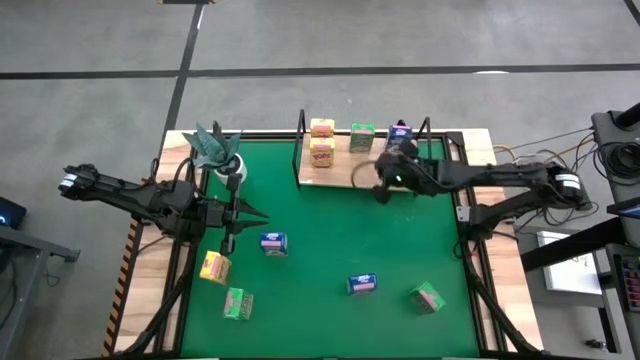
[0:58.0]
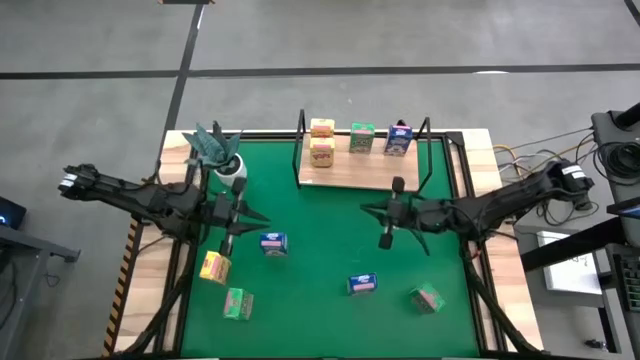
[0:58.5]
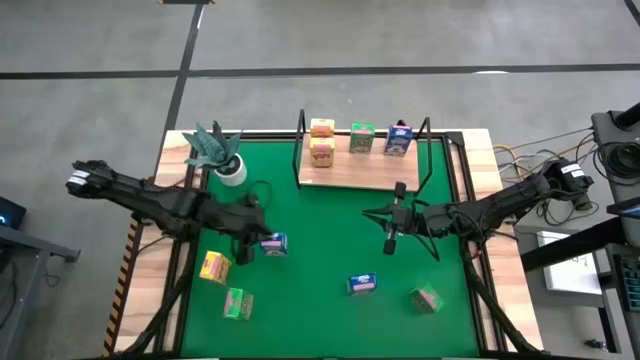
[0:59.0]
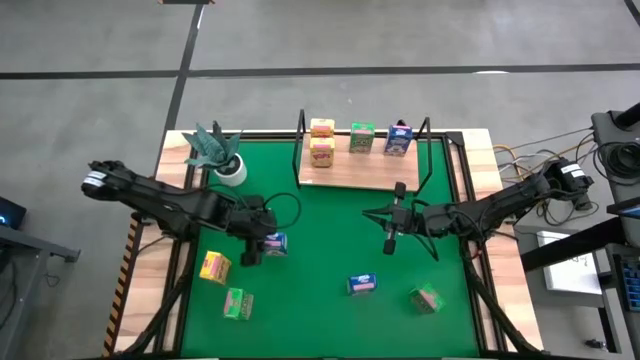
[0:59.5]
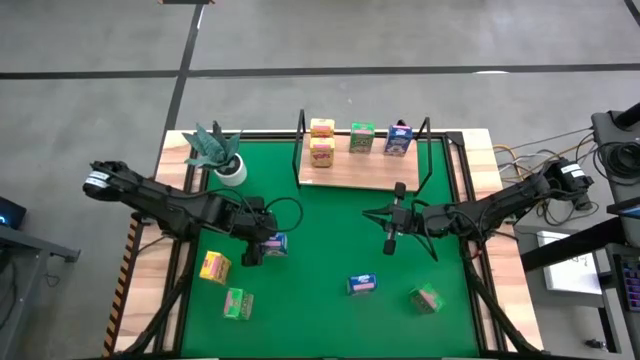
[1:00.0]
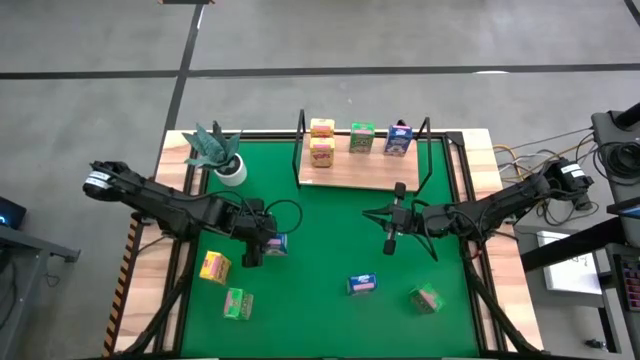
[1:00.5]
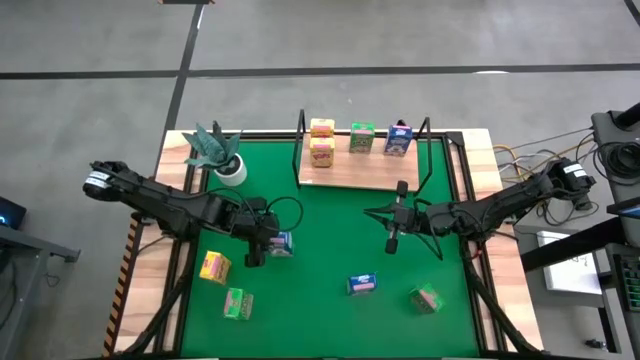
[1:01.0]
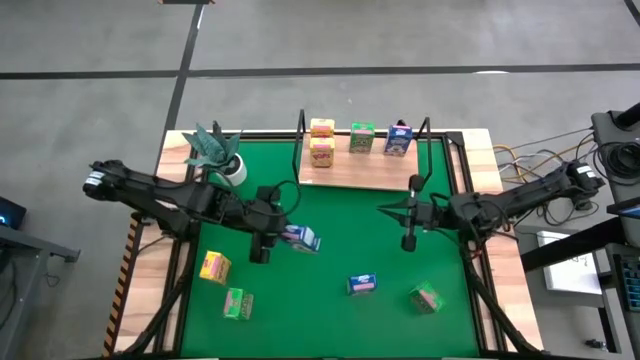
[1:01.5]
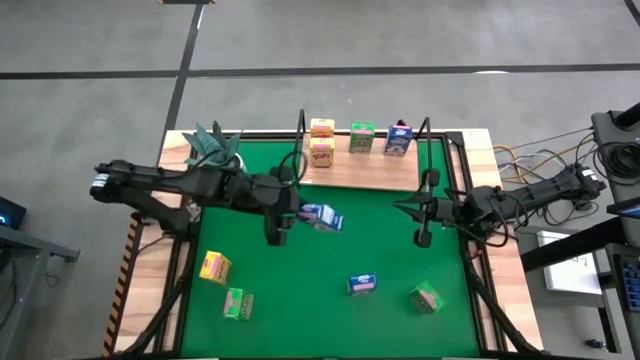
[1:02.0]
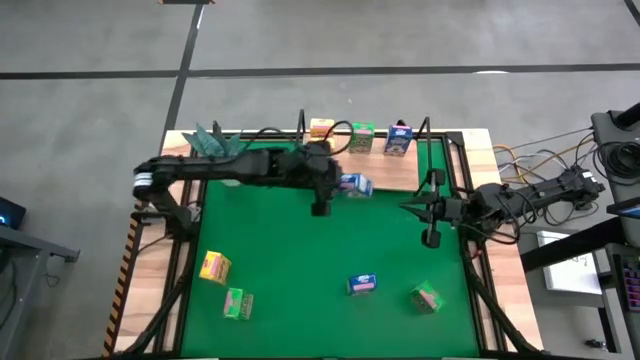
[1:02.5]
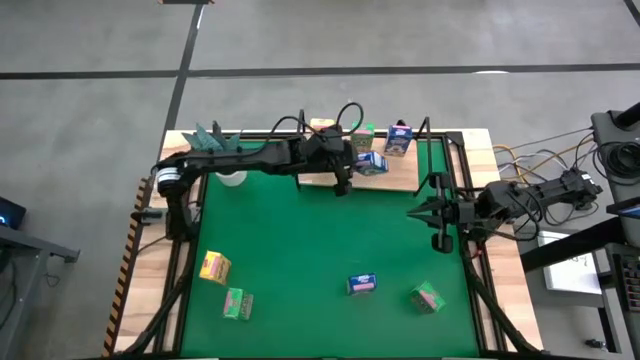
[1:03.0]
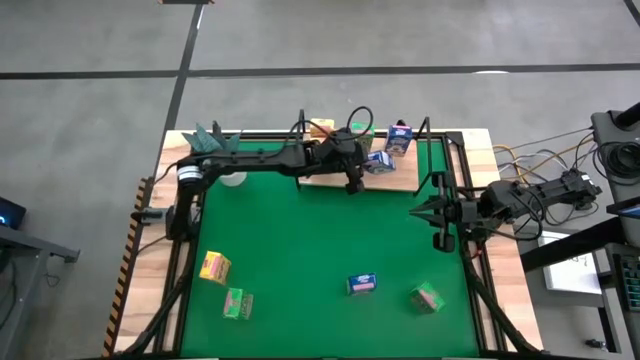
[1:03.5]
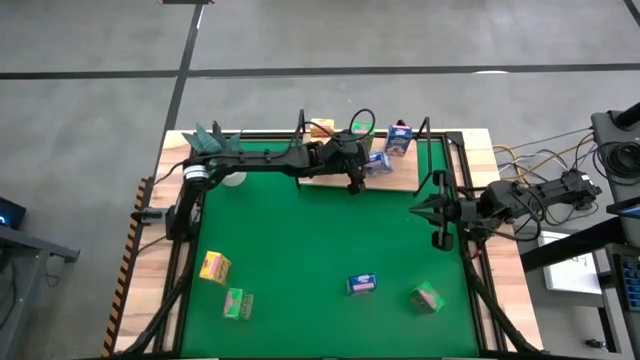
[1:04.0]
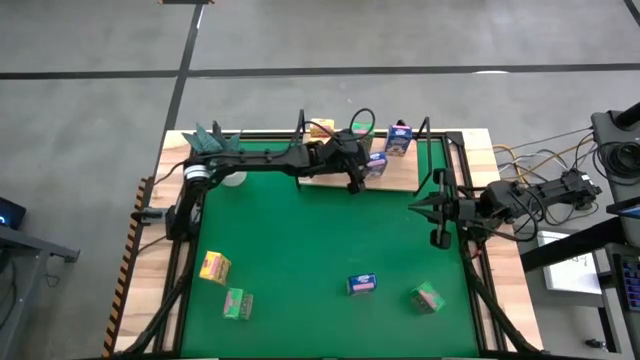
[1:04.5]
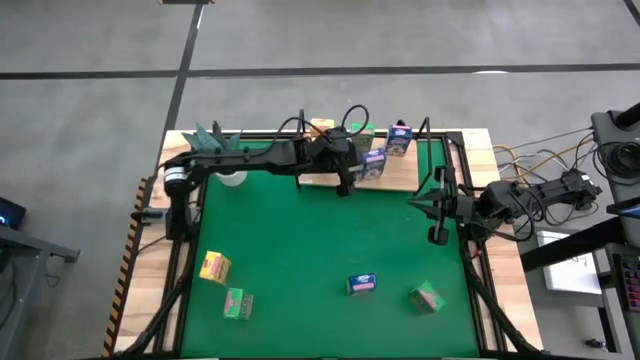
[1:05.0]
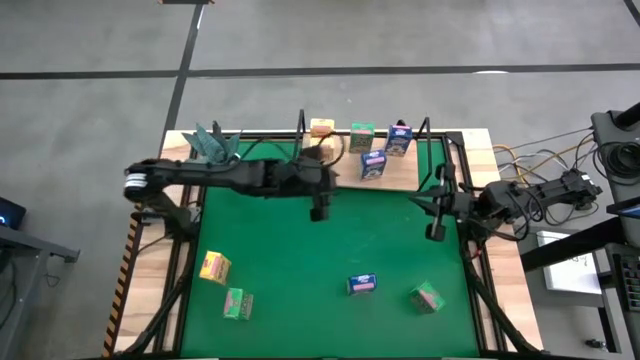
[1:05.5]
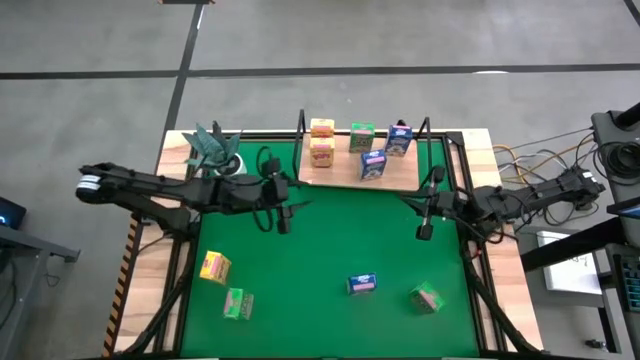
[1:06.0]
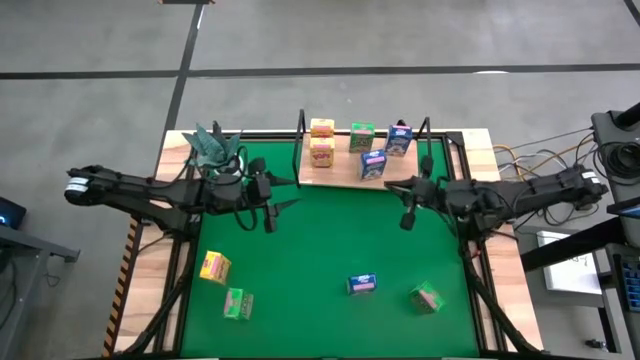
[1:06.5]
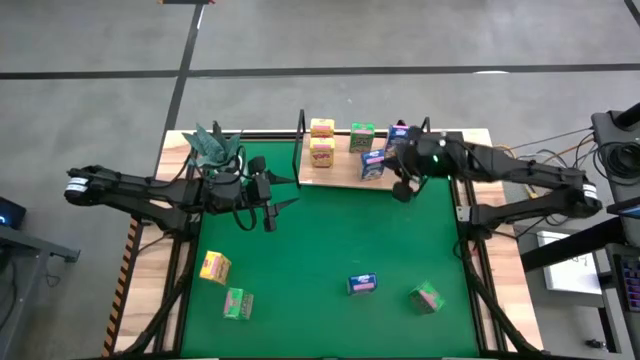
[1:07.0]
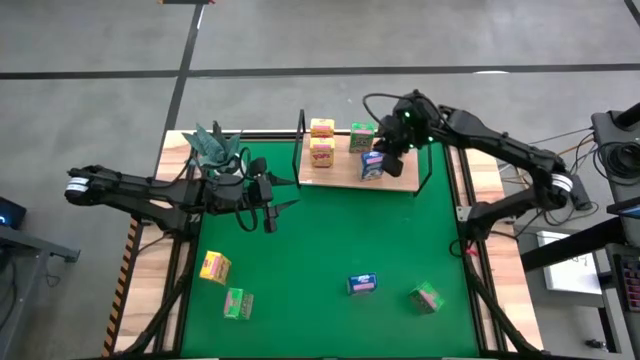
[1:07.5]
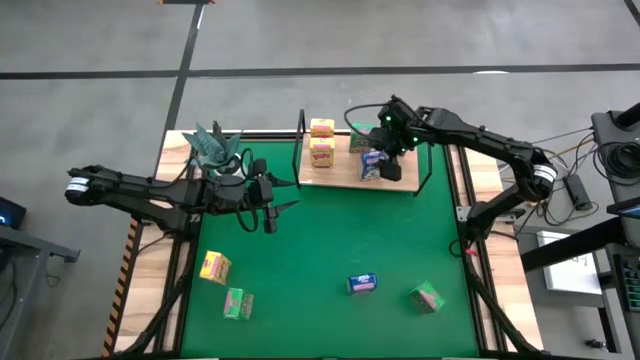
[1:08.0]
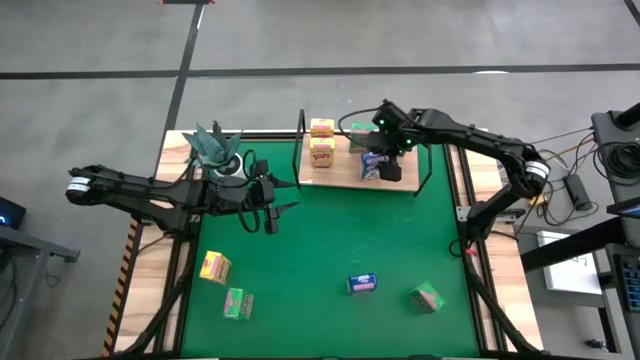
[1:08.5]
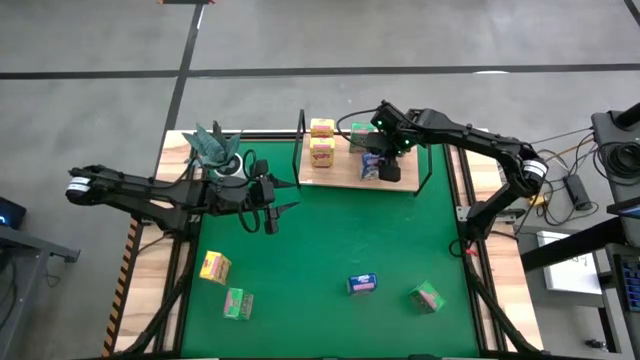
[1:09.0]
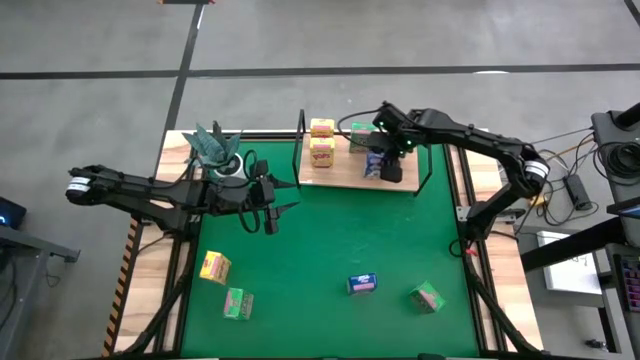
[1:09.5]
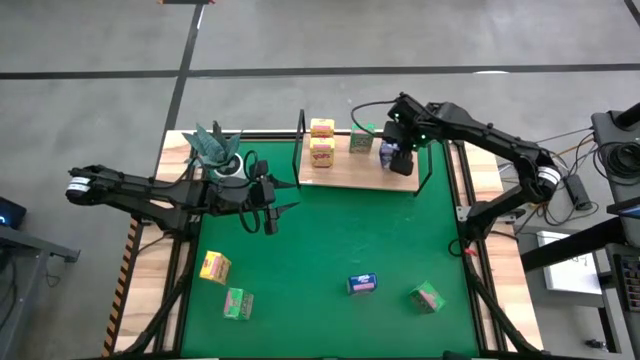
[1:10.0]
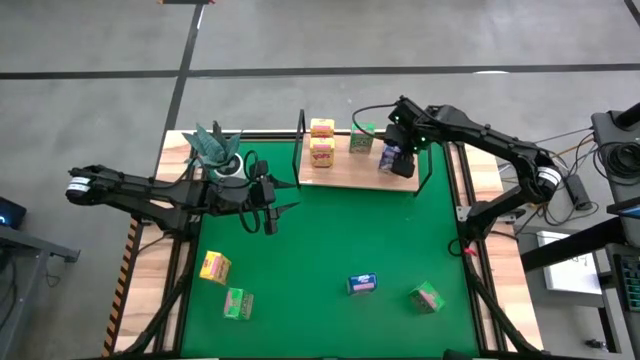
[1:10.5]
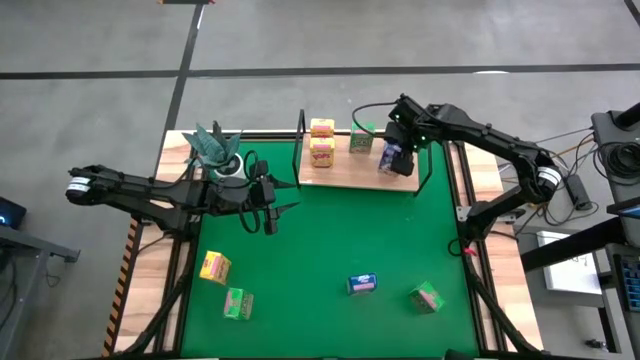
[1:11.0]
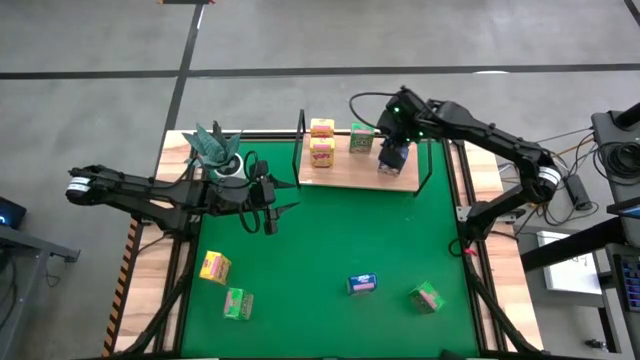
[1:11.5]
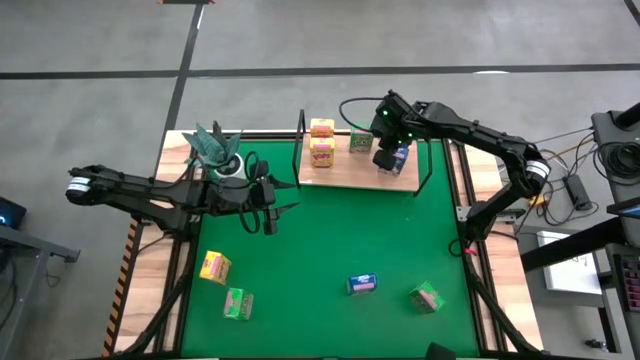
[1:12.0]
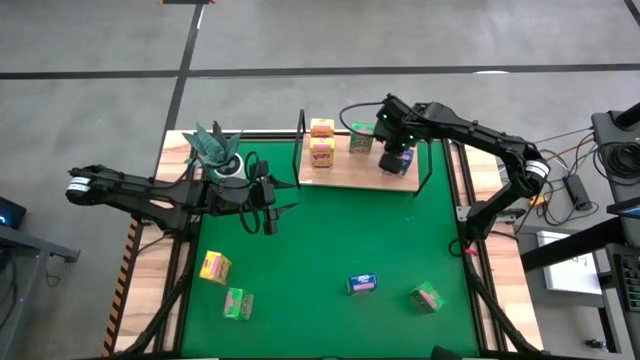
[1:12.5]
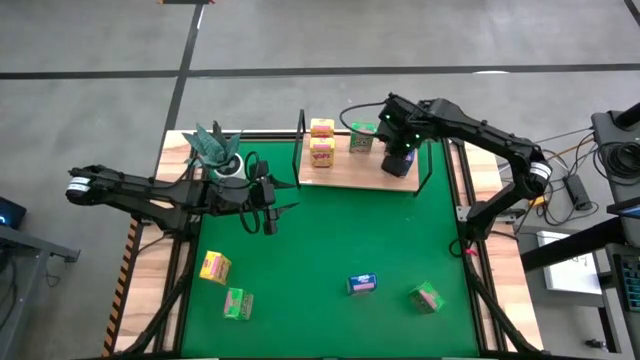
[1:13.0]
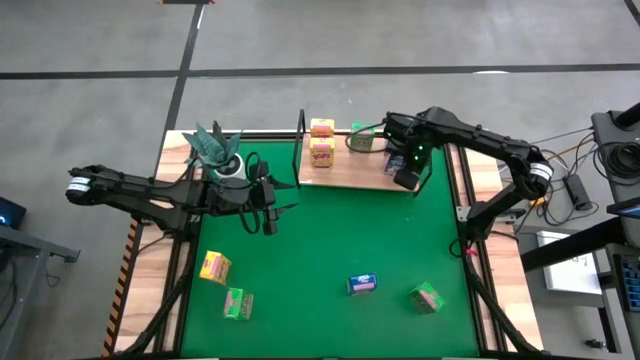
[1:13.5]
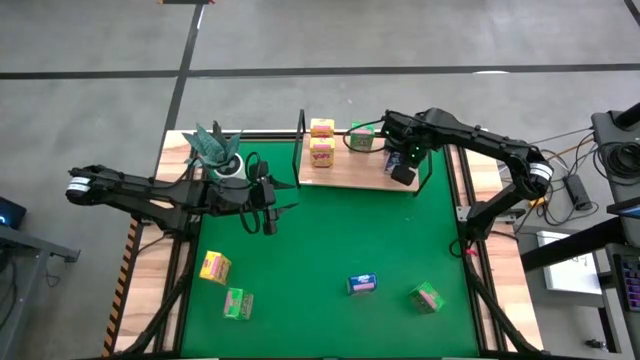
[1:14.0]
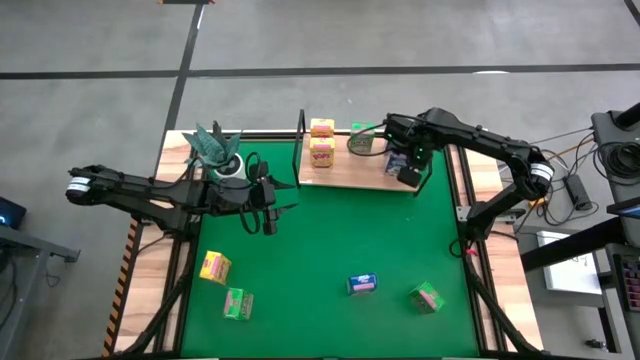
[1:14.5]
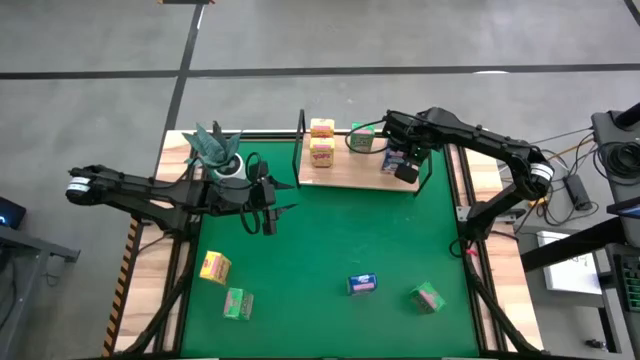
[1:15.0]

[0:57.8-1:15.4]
Task: Stack cereal on shelf
Put the top blue cereal box on the shelf

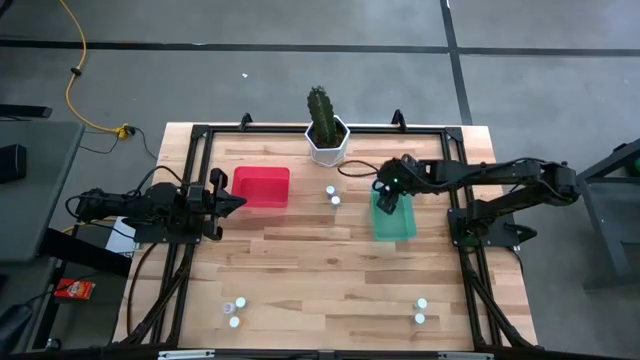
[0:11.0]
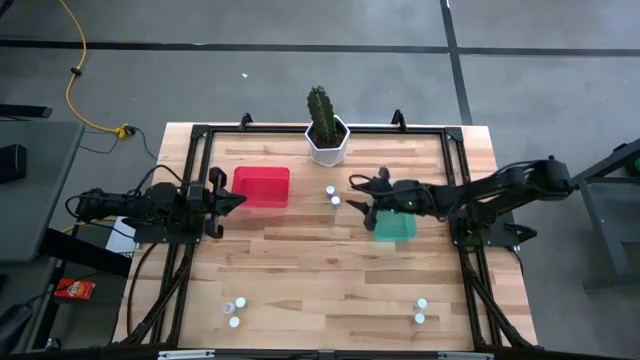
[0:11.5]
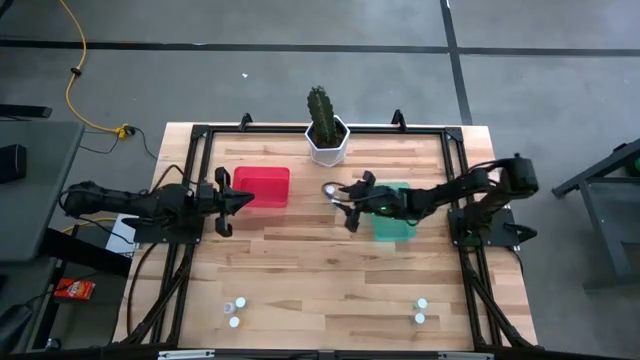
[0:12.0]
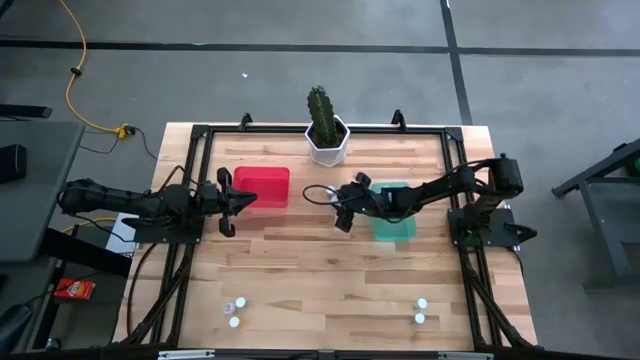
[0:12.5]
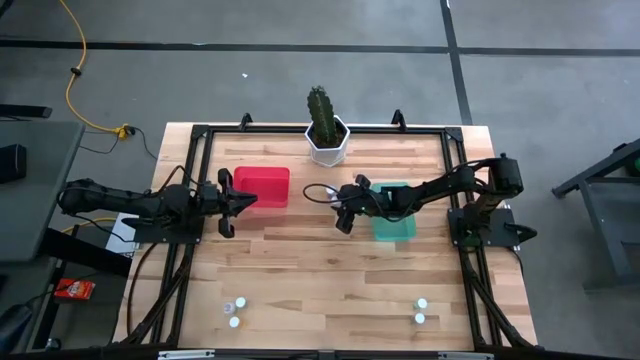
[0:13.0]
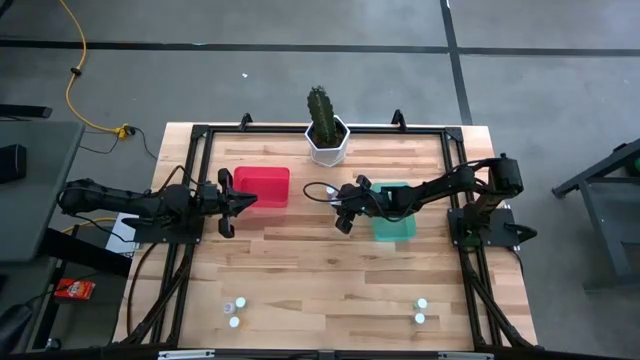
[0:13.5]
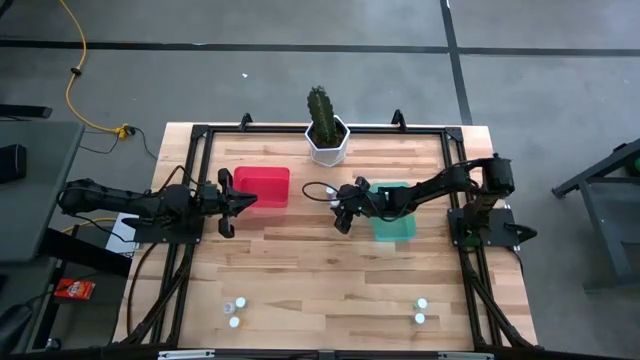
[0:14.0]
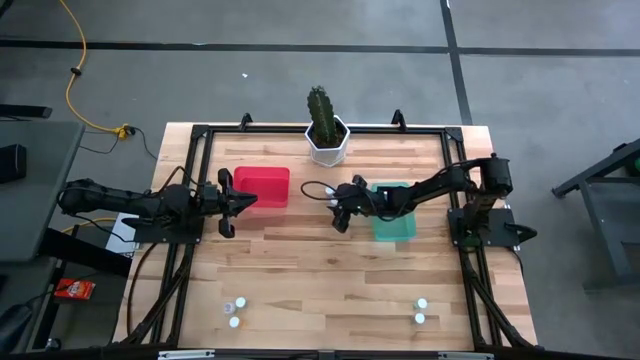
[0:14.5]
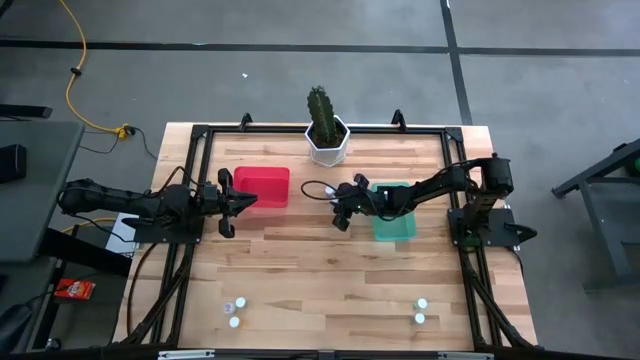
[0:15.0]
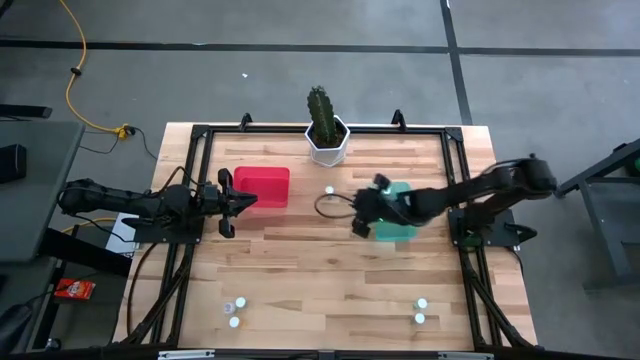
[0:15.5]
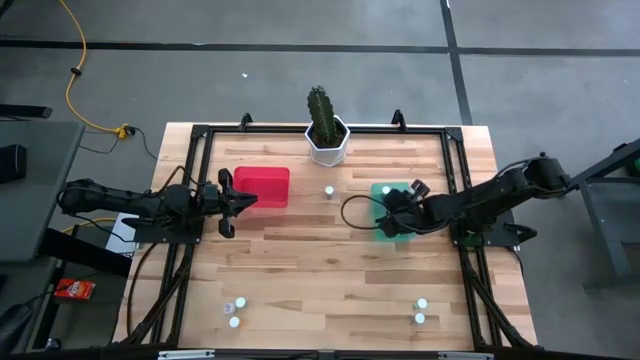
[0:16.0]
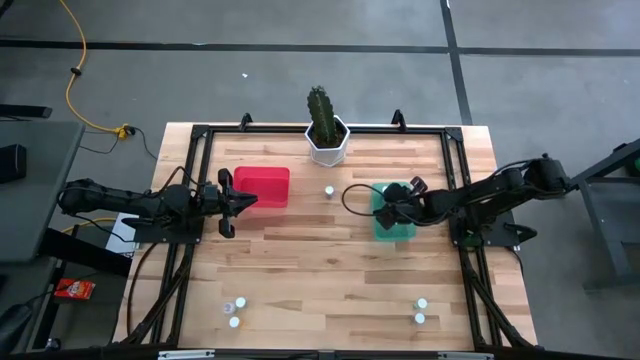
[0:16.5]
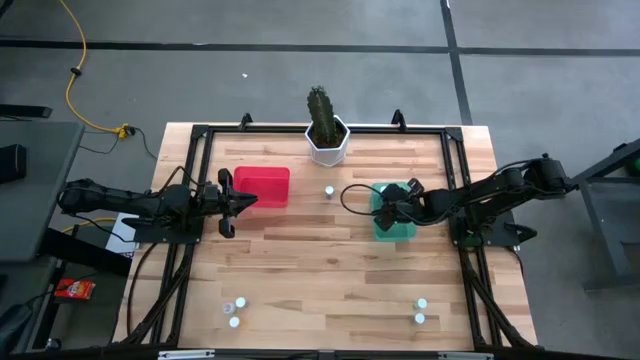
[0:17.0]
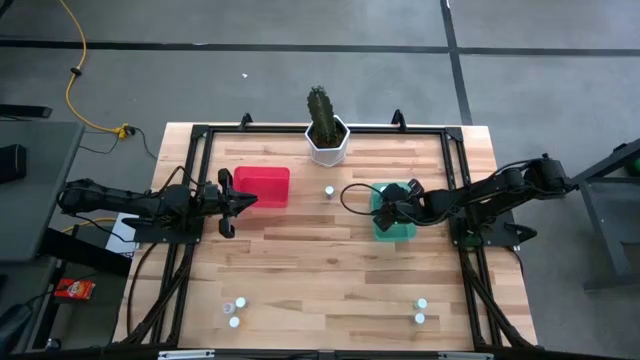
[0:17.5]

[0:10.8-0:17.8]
Task: Pick and place medicine bottles into bin by pill shape (circle, oval)
Put the top green capsule bottle into the green bin
